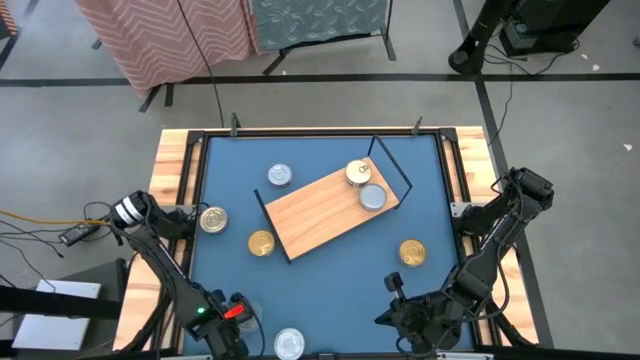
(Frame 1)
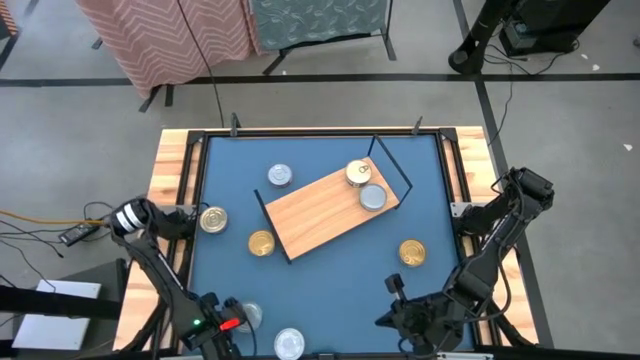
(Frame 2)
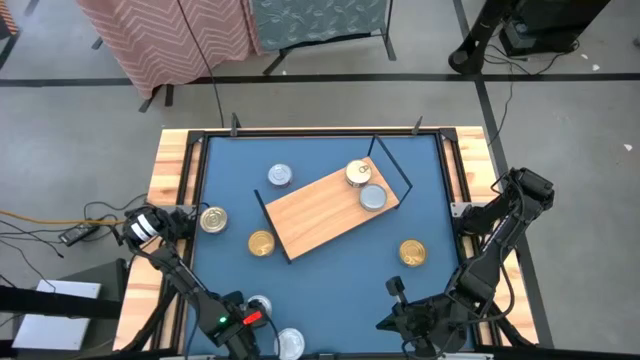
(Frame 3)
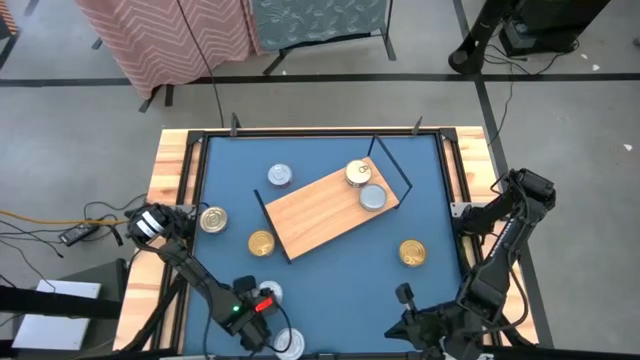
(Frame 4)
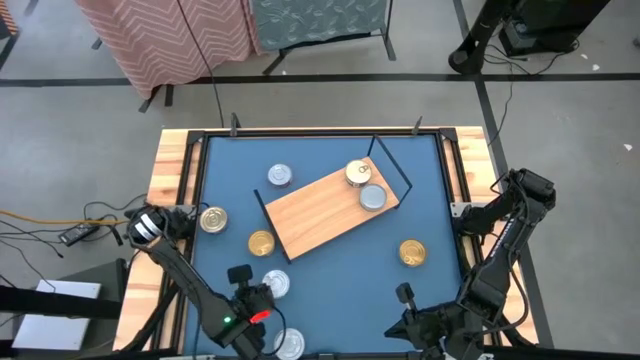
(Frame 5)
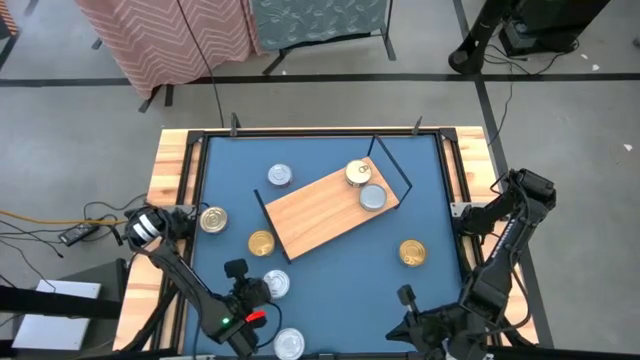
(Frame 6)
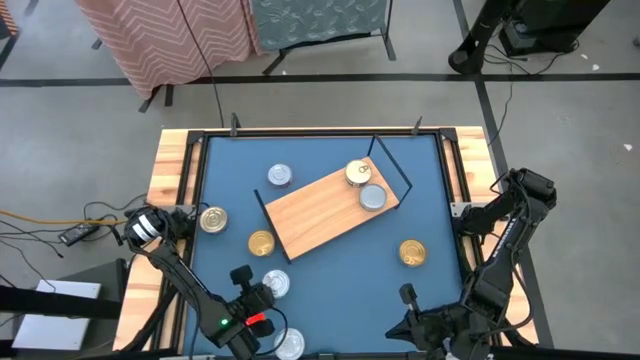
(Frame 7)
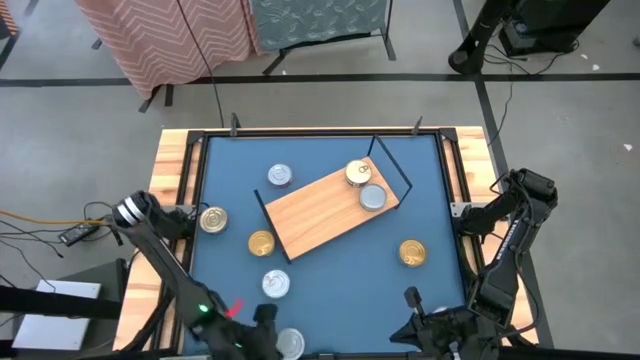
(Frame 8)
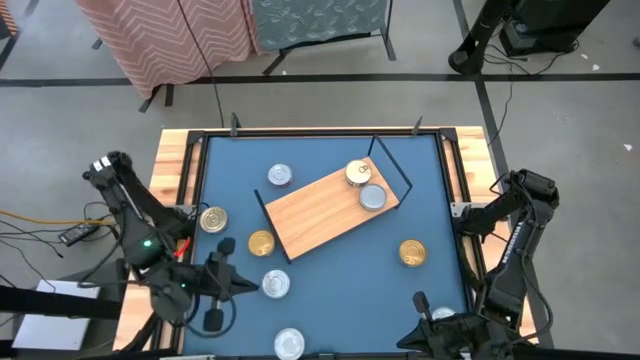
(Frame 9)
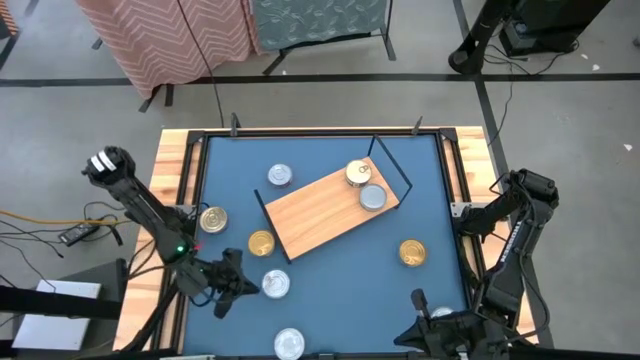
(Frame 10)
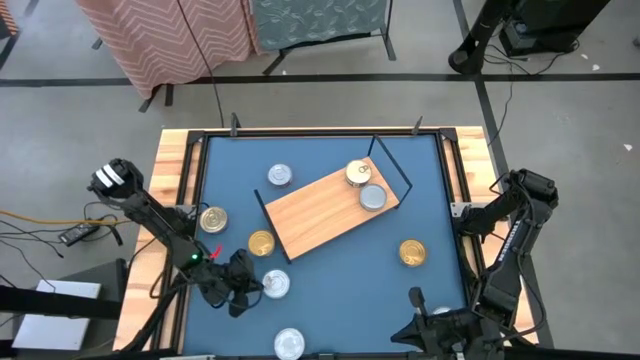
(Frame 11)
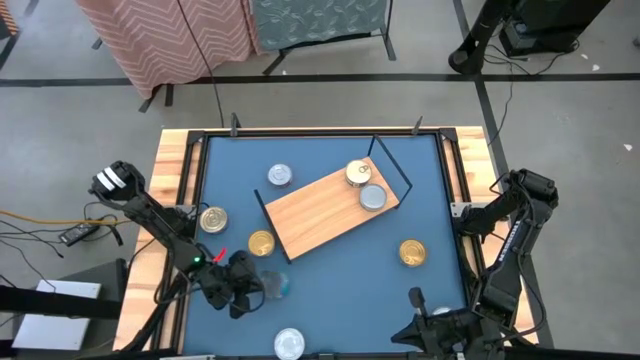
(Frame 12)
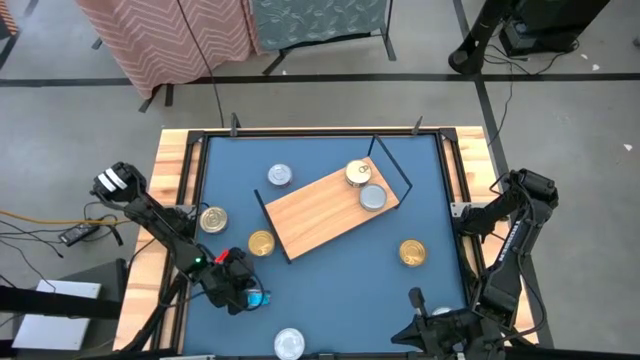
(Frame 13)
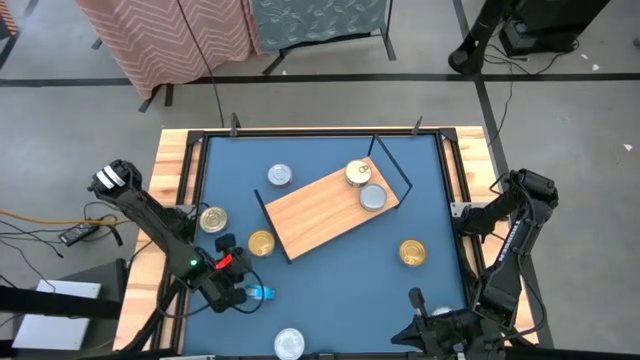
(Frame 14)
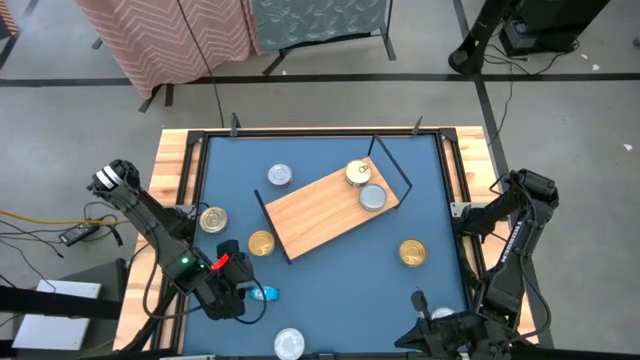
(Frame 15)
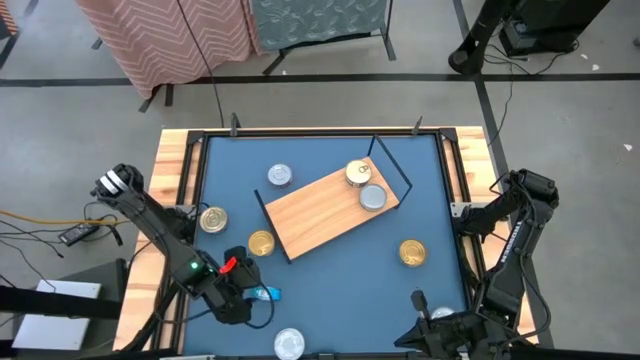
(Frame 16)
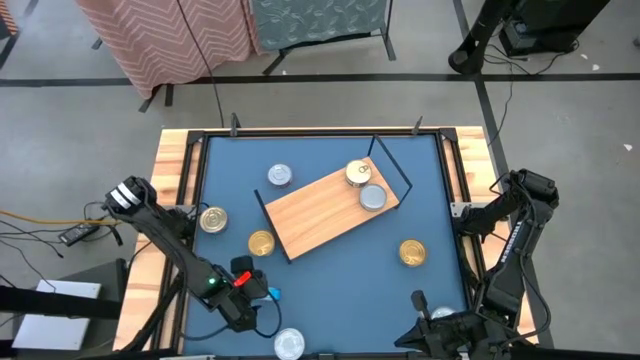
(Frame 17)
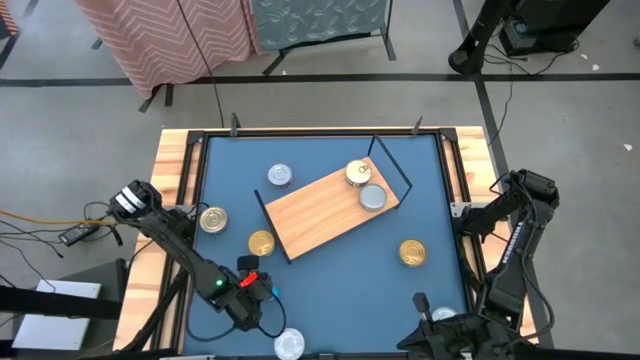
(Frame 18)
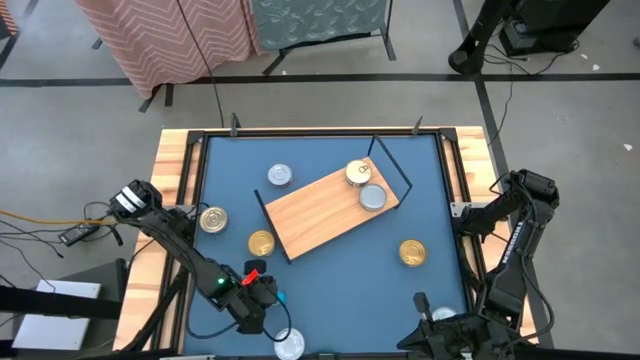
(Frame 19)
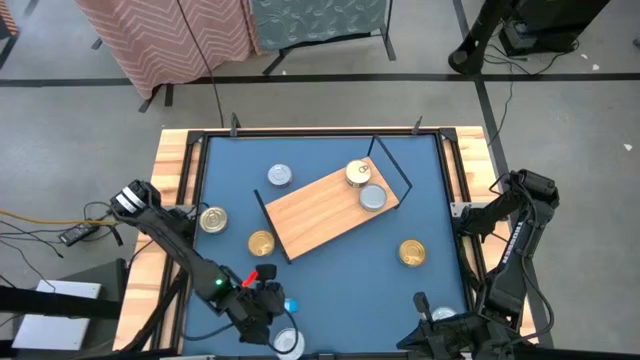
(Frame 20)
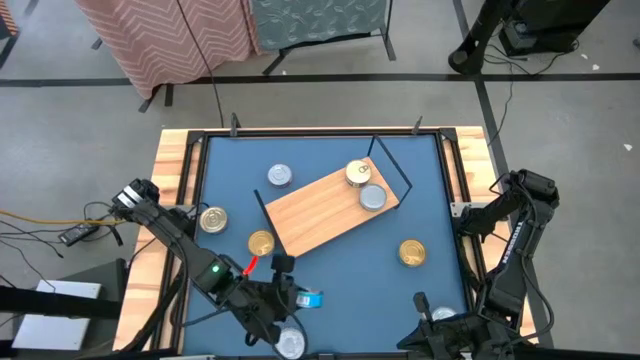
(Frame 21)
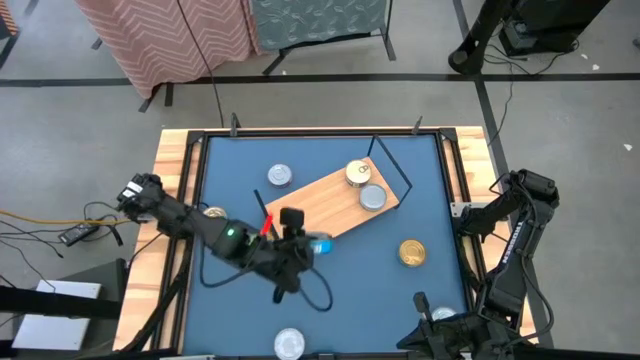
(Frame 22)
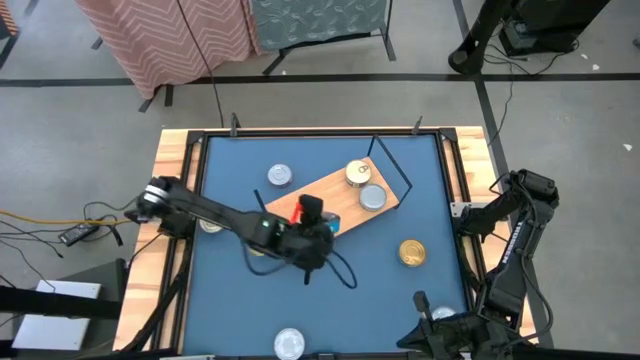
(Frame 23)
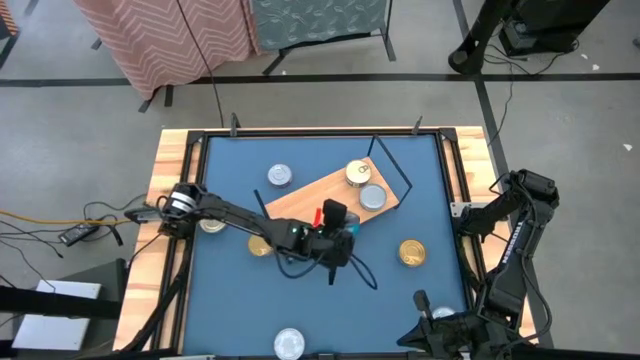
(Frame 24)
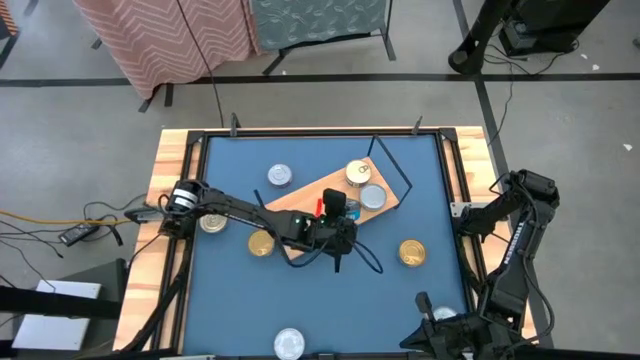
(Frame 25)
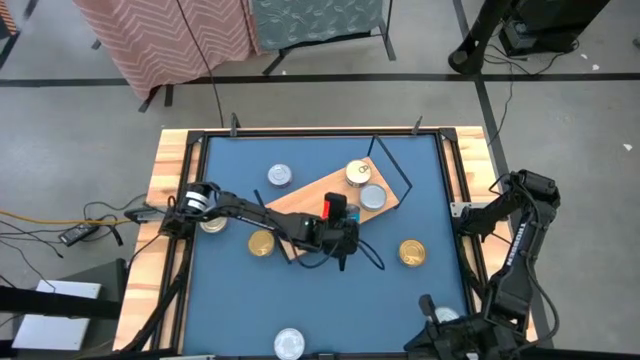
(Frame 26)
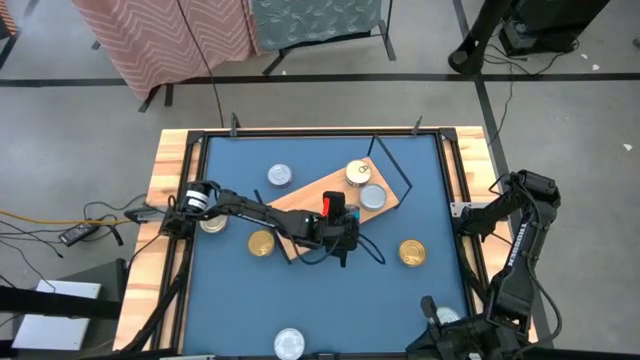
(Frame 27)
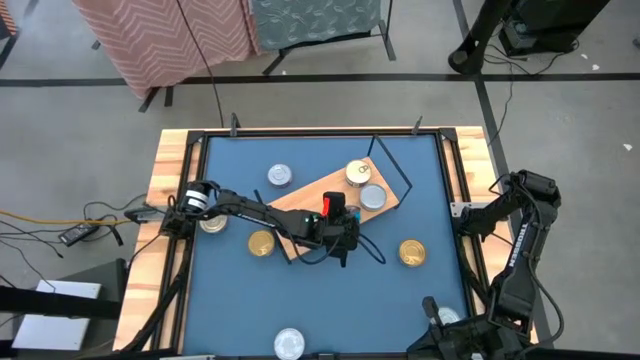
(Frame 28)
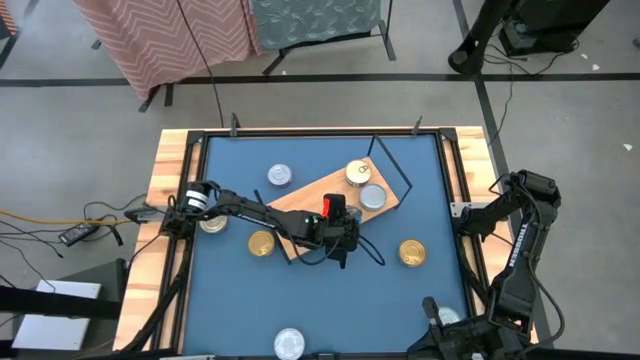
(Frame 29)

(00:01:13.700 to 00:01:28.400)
Task: Stack canned seafood by type on shelf
Put the green/blue tuna can on the shelf

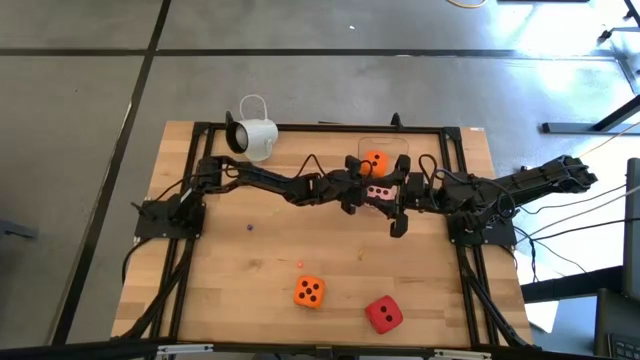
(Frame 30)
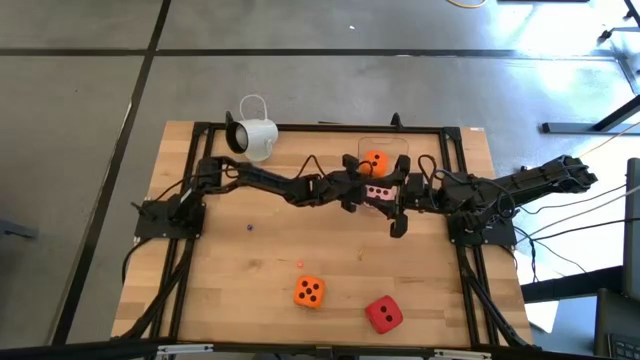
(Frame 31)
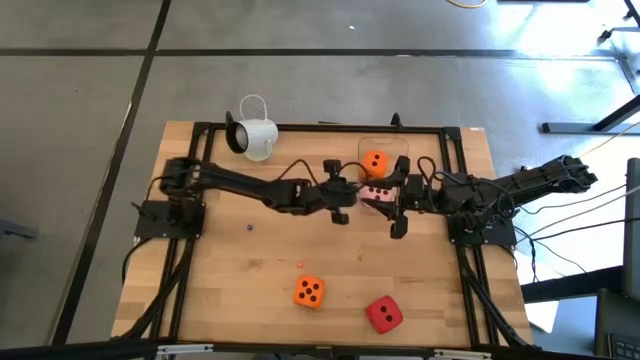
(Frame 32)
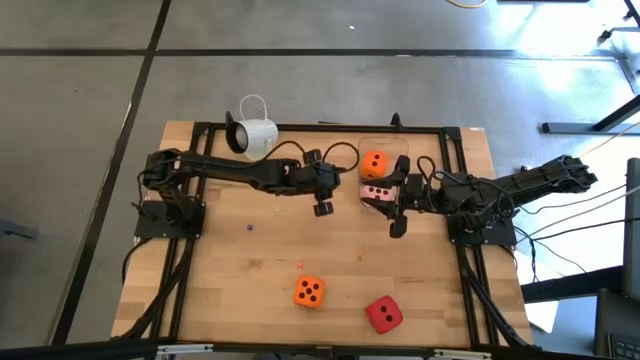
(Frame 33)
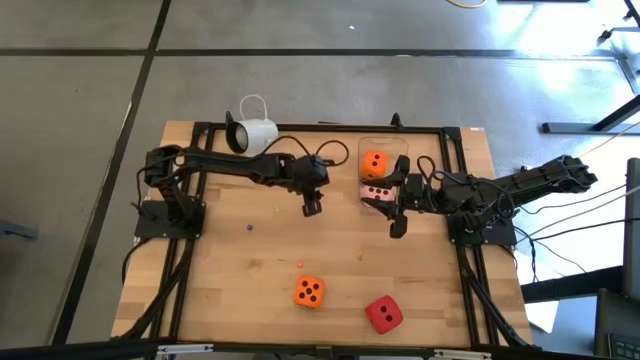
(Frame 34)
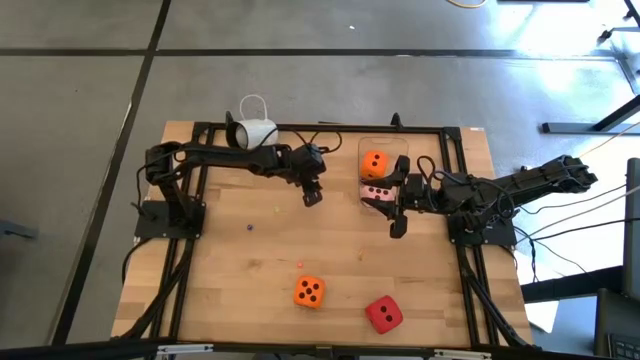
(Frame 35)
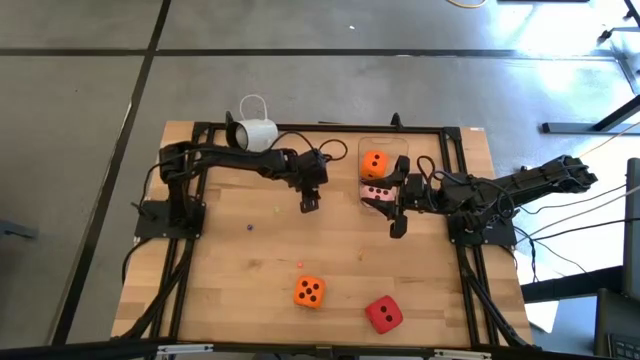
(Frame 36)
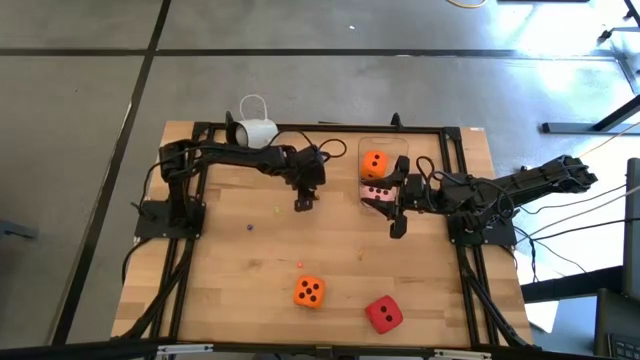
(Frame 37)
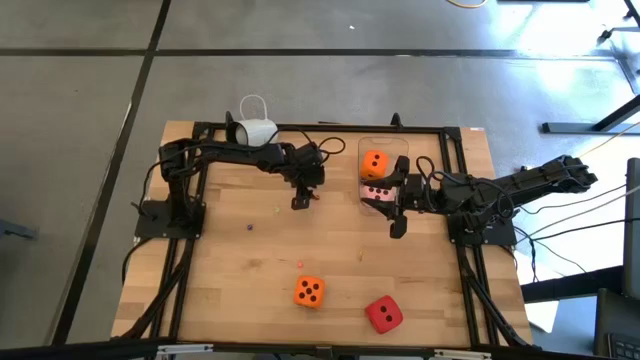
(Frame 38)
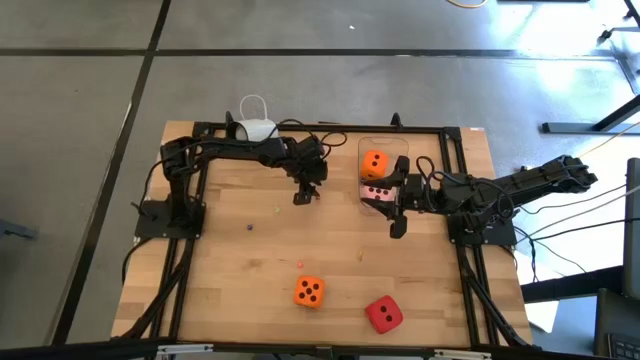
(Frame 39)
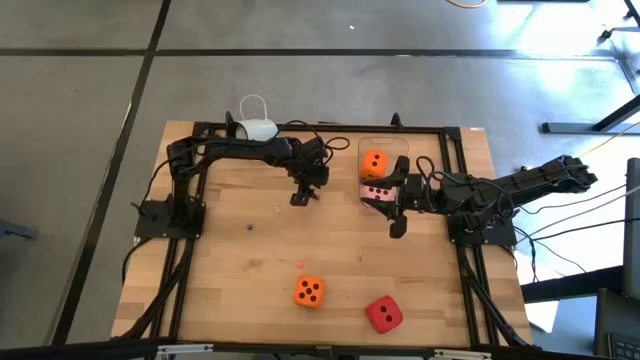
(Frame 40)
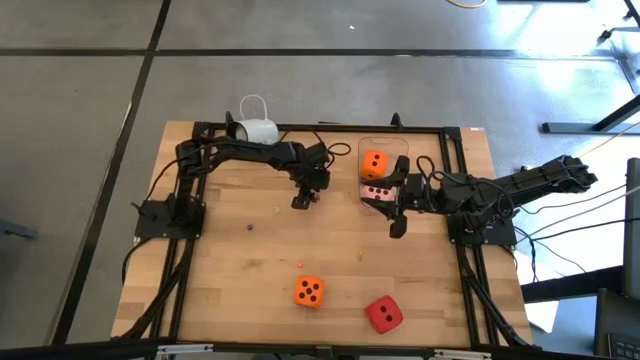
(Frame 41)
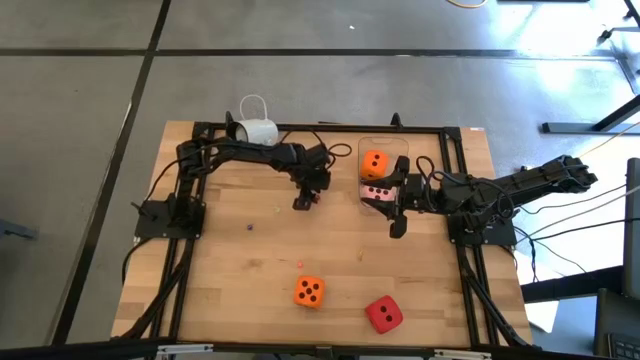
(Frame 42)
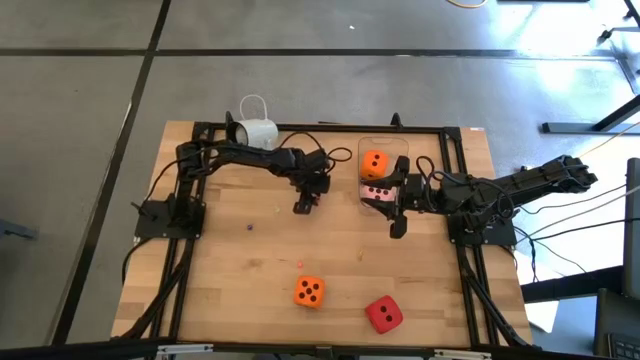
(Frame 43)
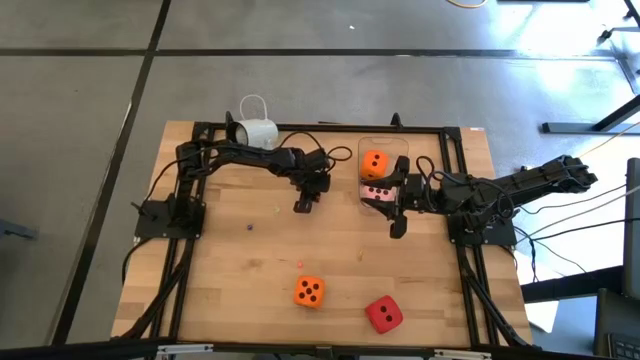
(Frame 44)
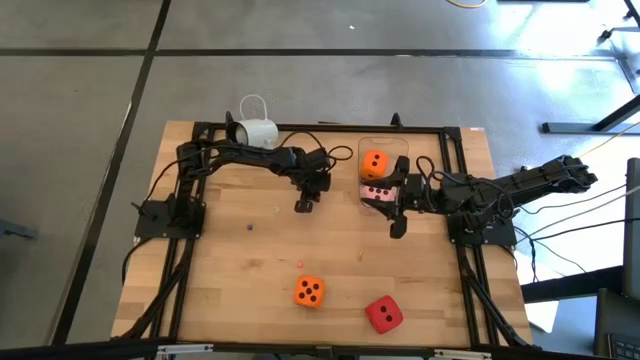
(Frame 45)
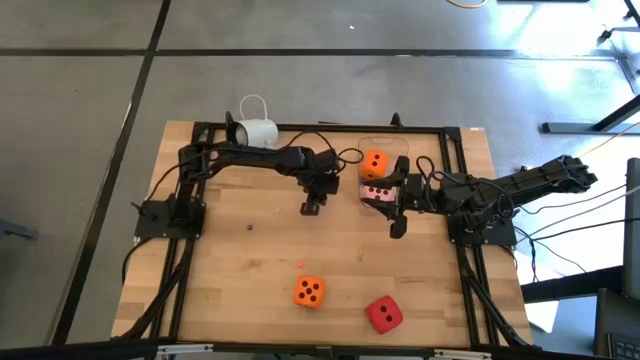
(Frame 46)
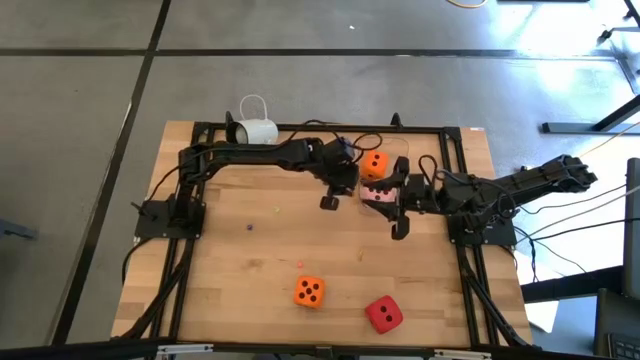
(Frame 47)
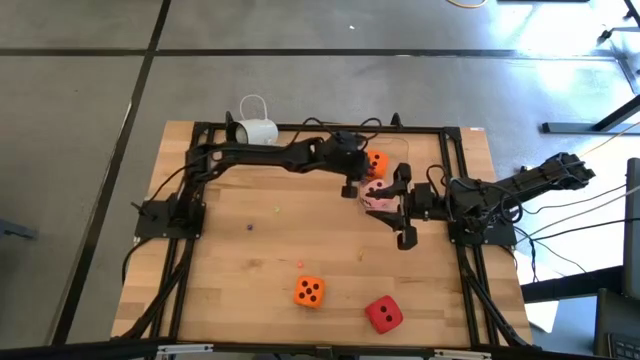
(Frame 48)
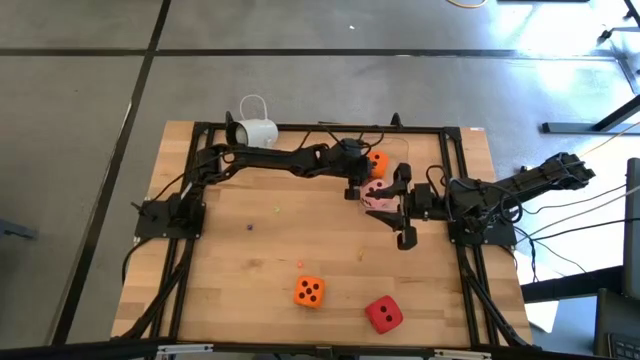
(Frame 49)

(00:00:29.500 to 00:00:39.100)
Task: Pick & Place Dice
Put the small red die into the transparent bin
